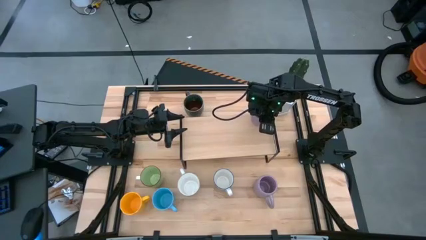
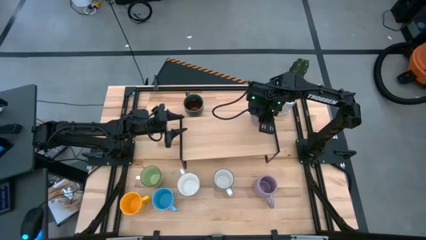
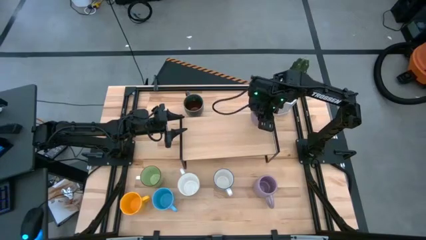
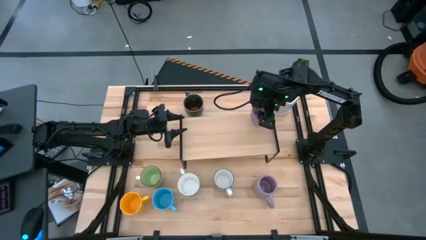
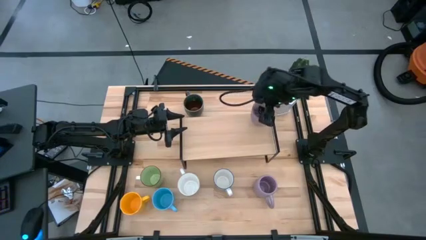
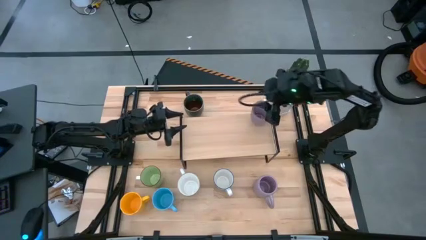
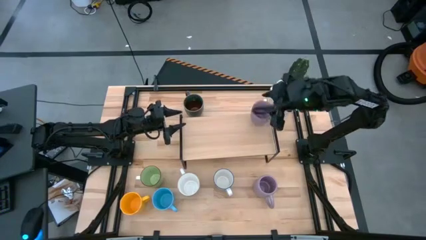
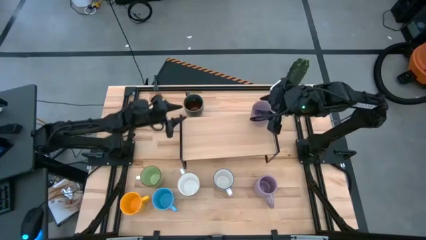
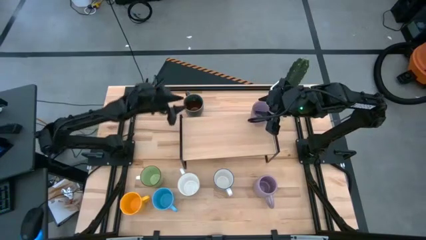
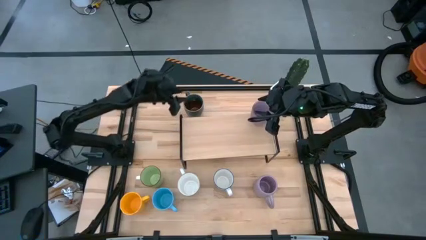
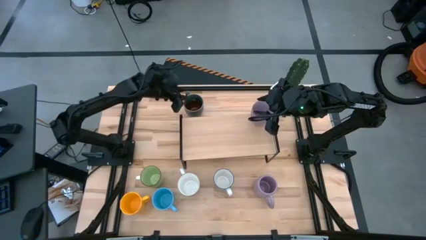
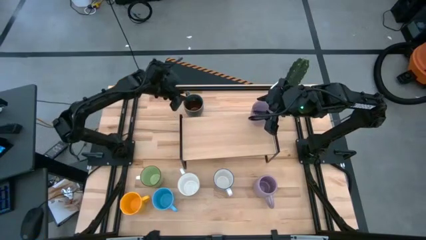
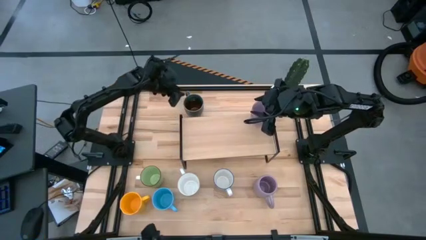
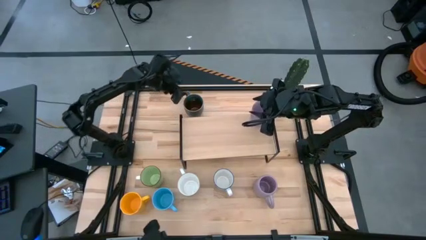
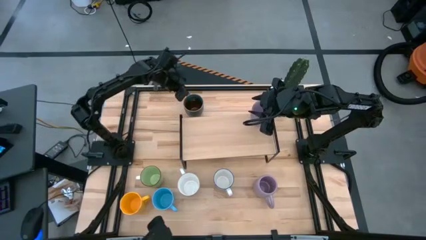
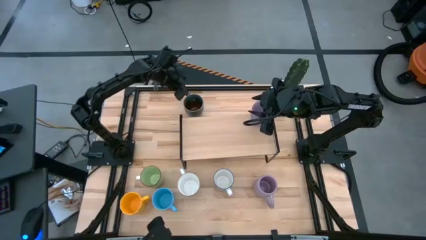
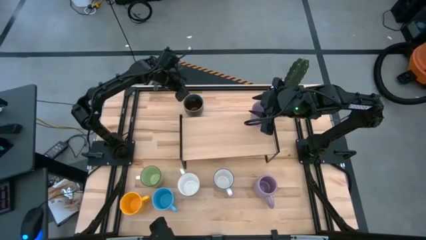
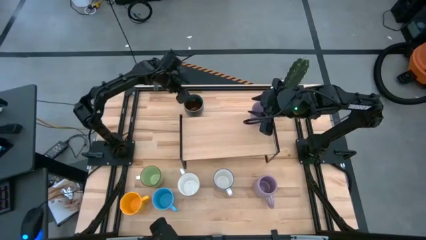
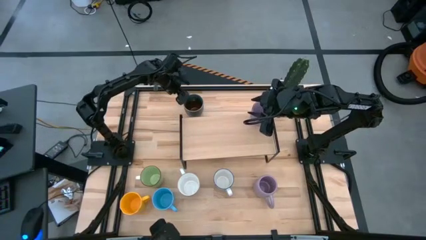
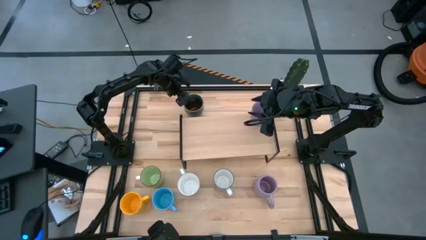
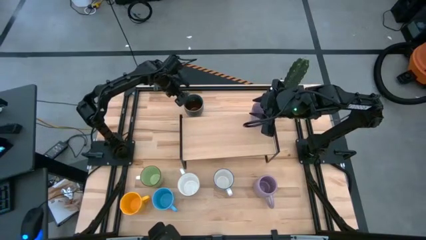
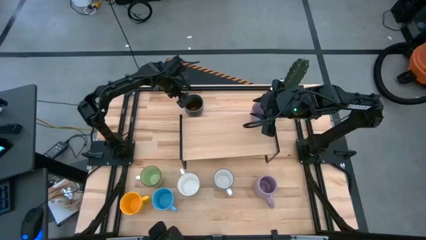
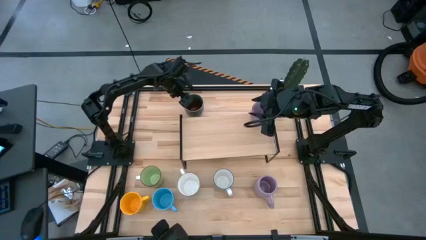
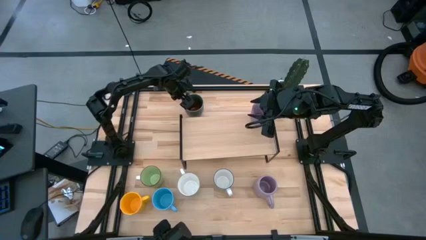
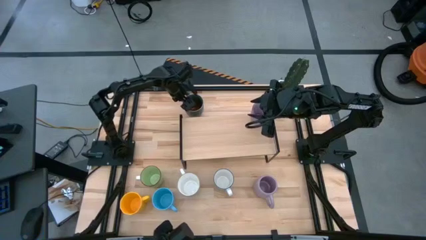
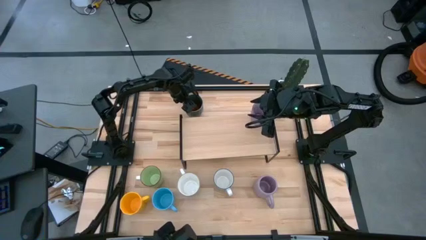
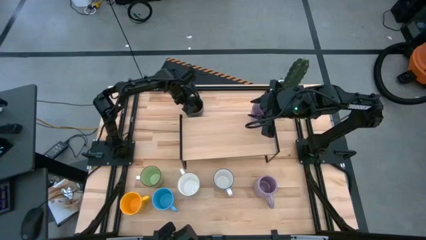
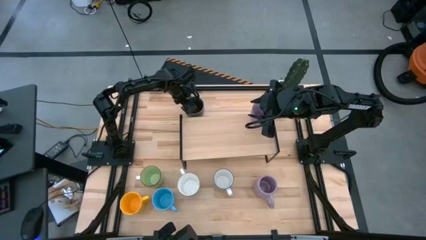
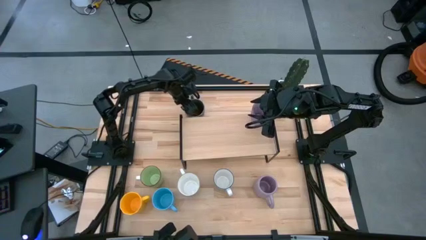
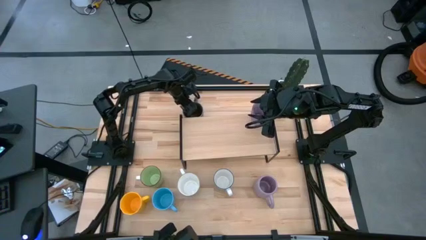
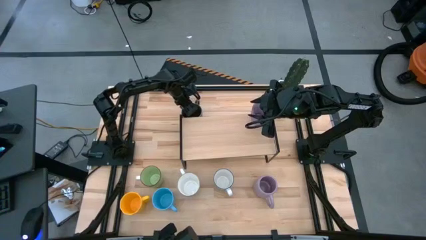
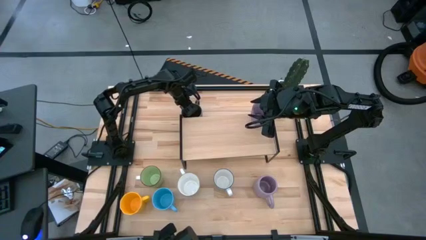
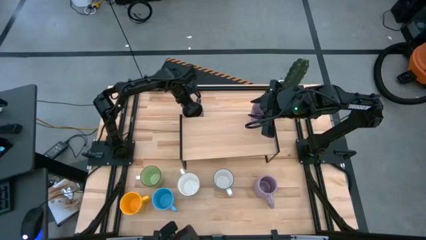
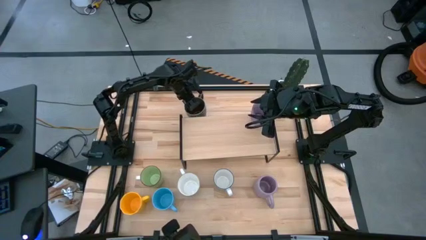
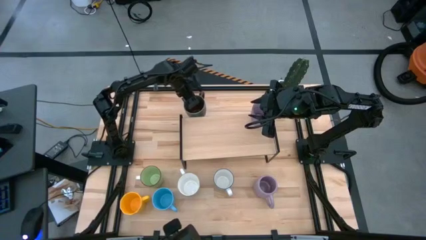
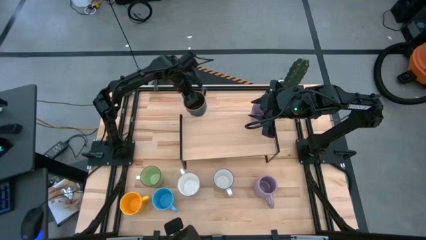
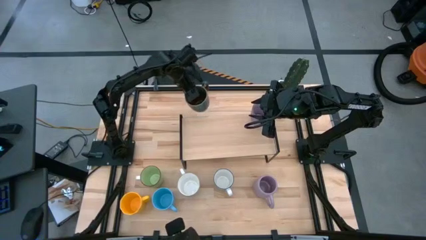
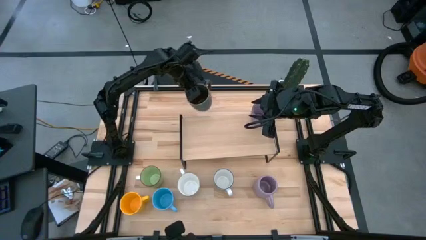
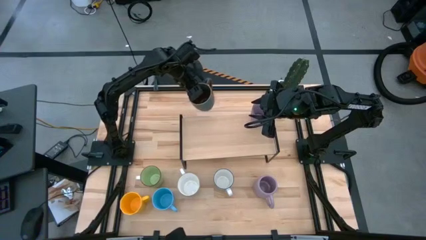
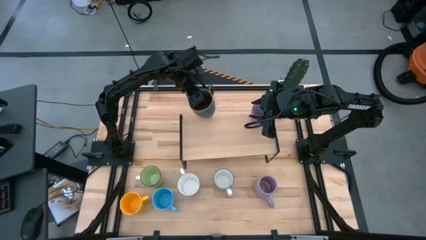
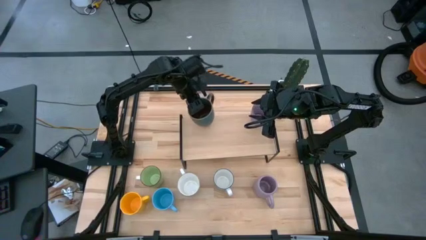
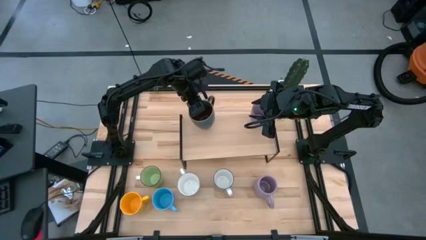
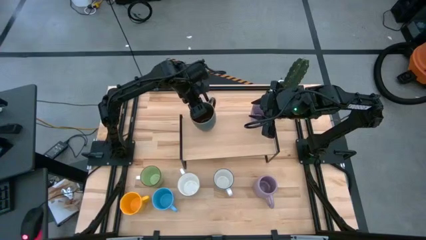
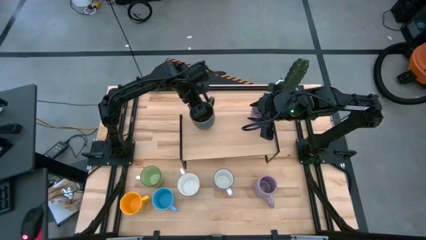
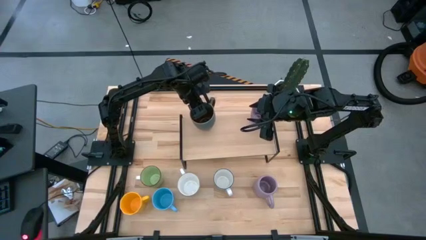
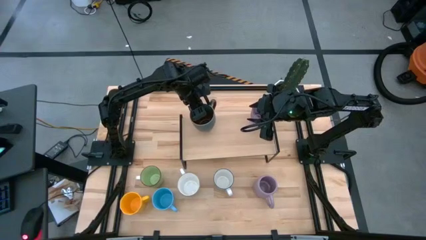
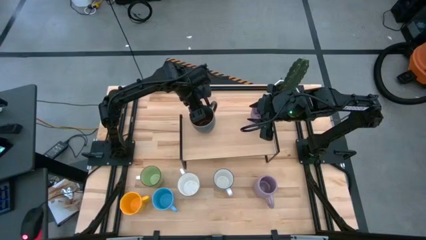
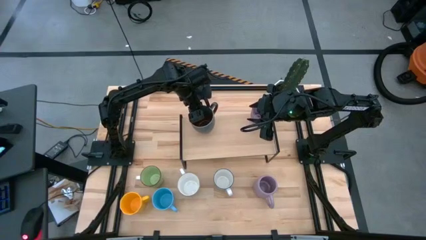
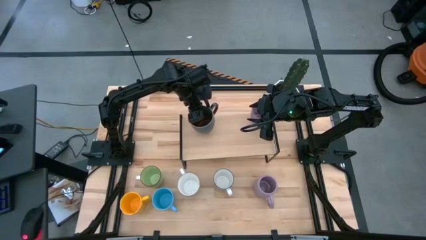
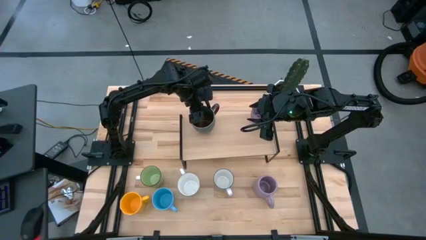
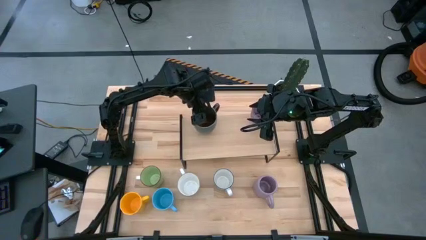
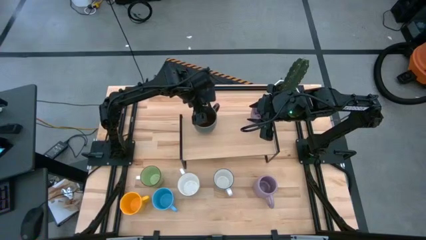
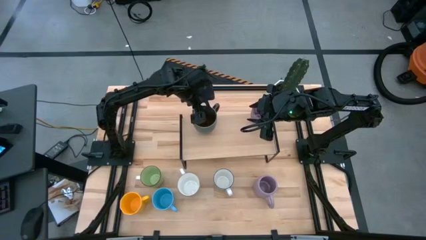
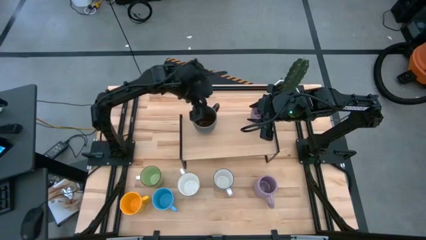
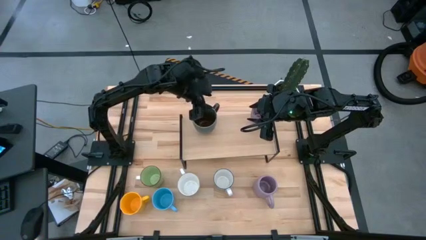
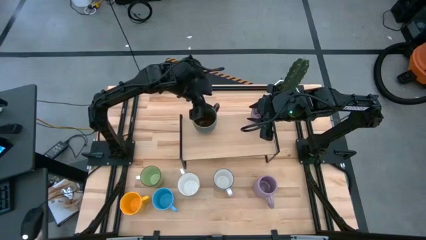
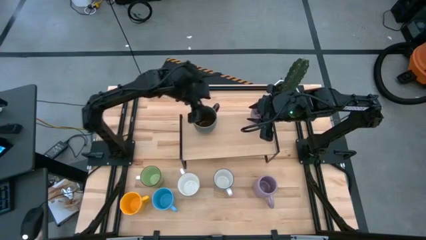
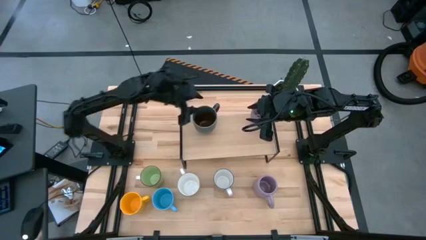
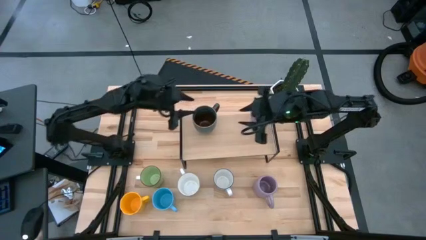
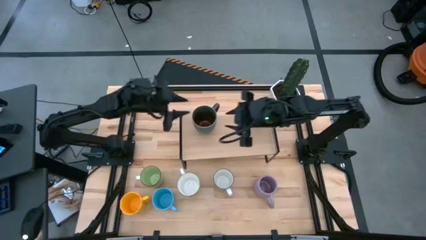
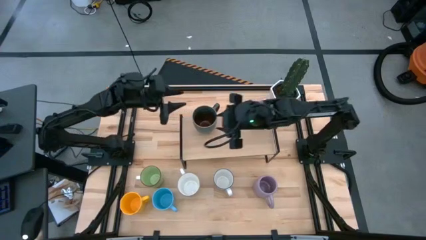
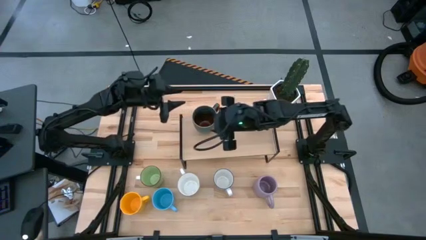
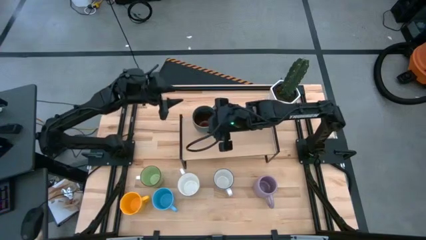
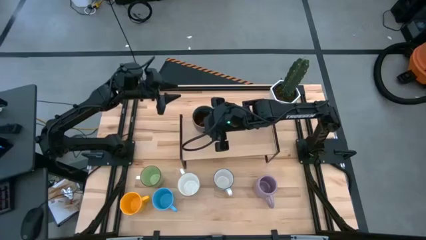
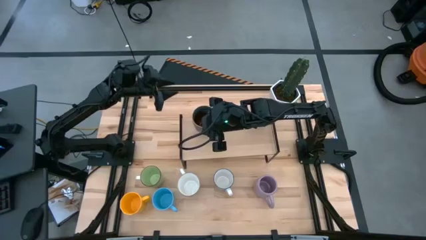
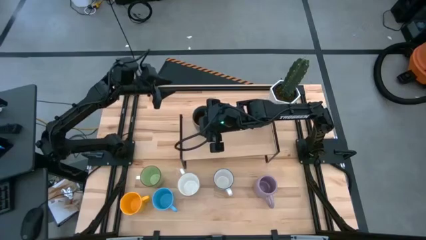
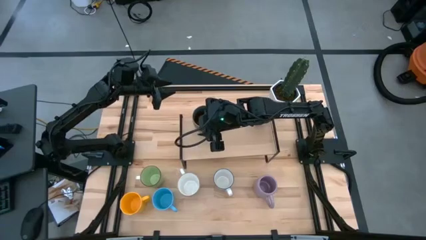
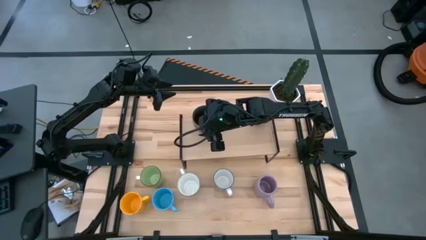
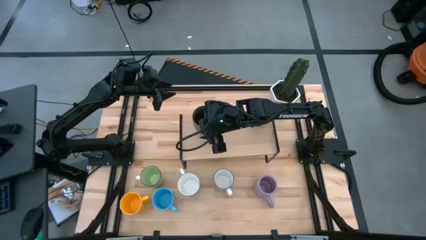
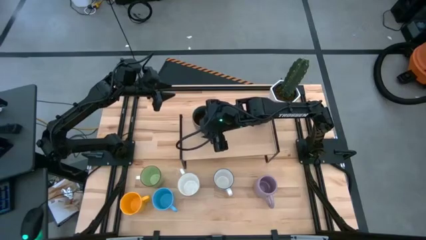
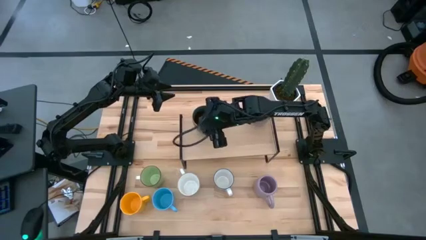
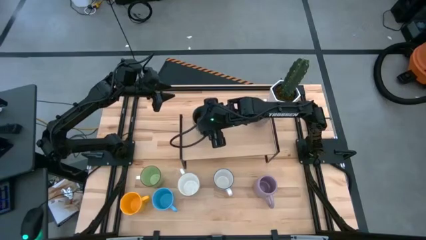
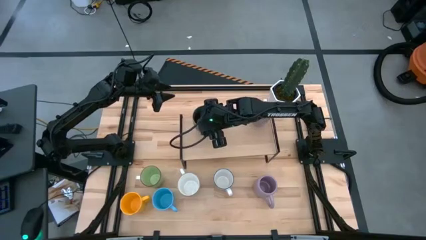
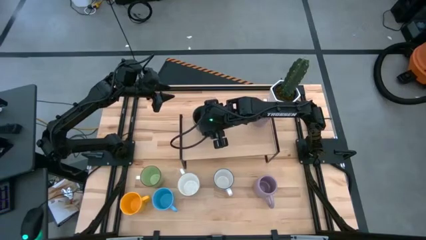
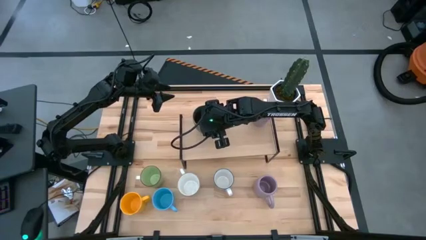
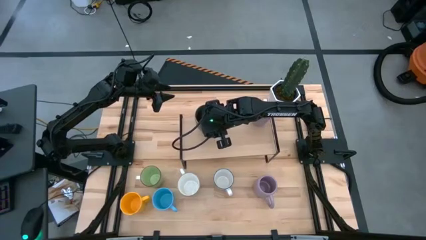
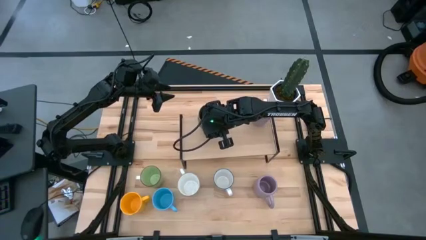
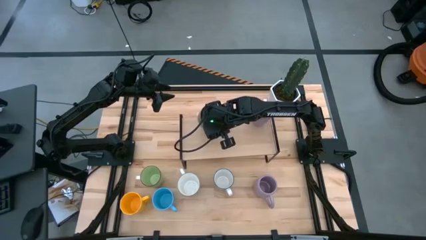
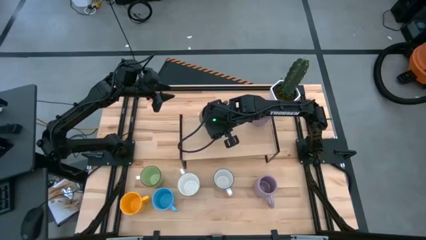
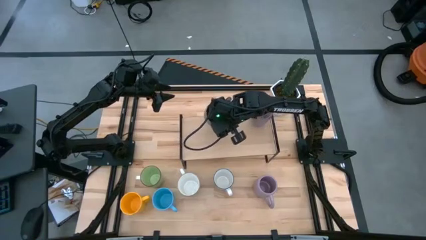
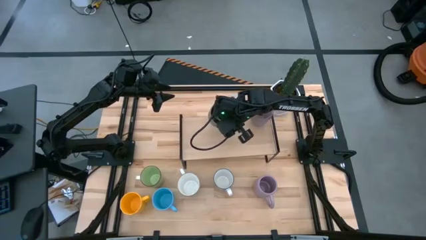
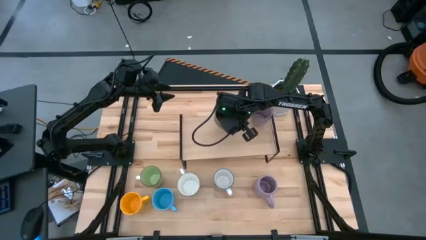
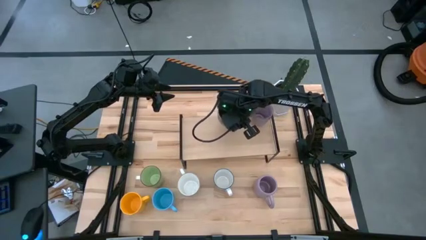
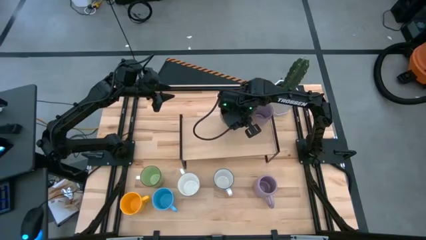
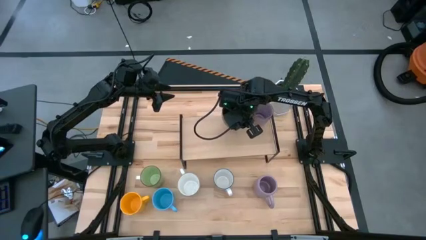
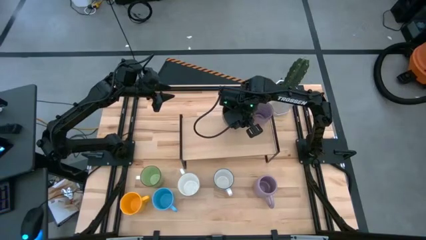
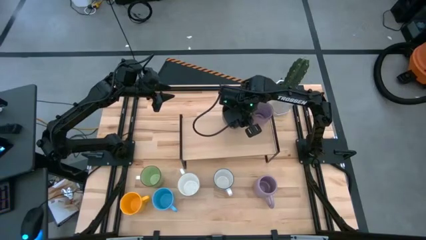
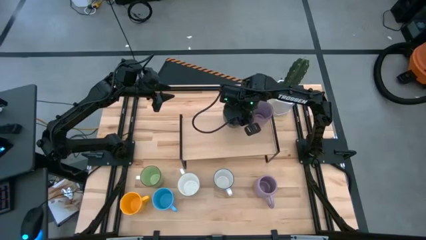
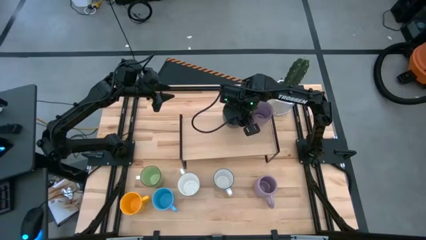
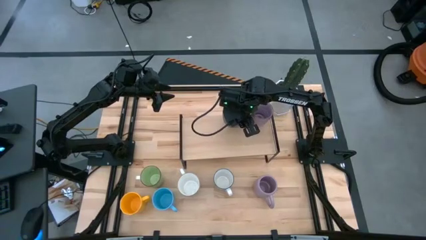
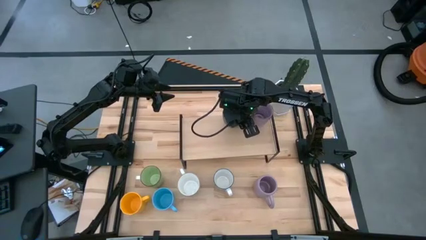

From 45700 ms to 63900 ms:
Task: Place coffee mugs
Put the dark green mug on the shelf
